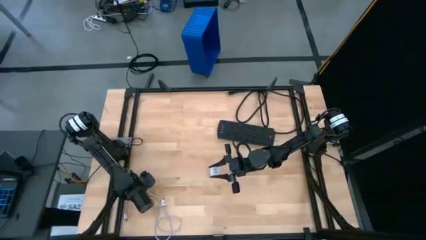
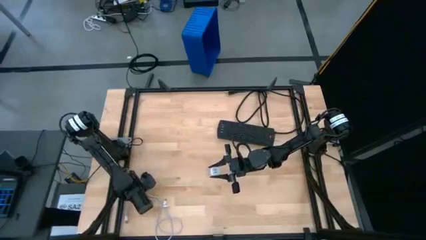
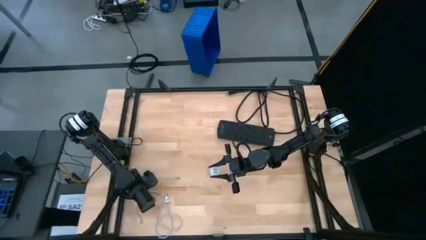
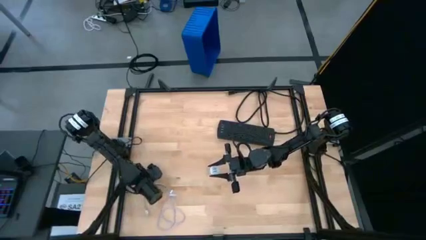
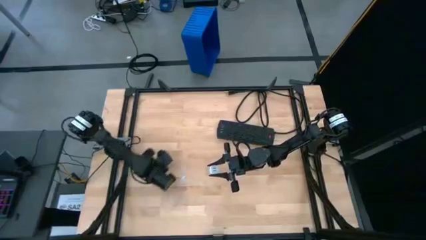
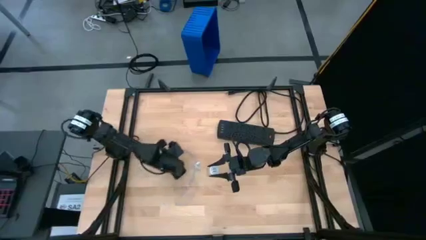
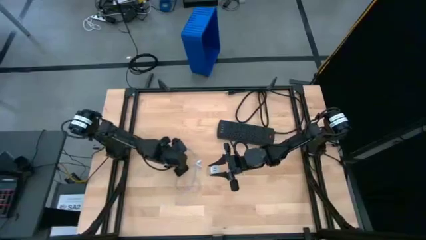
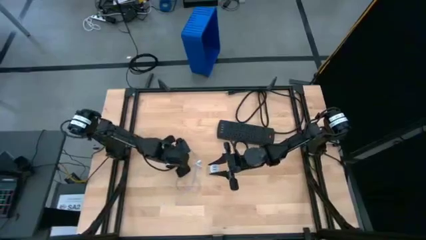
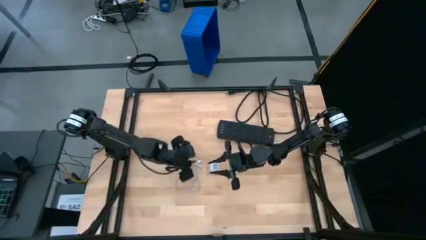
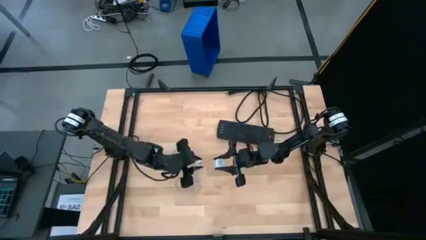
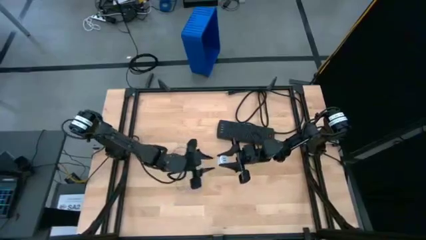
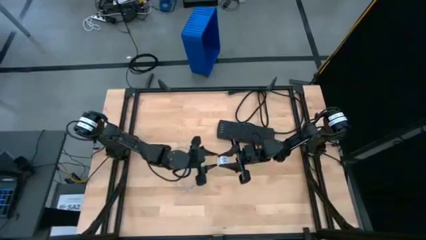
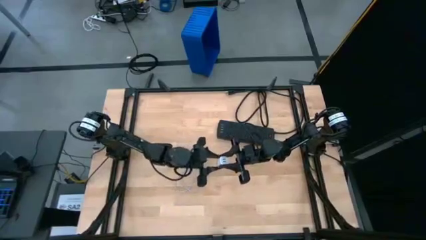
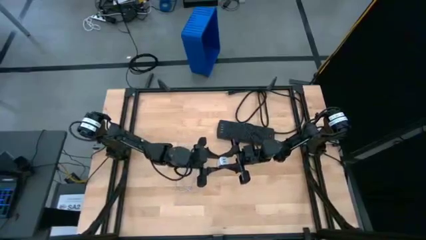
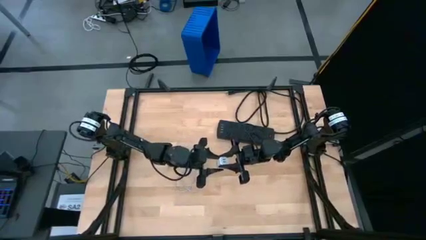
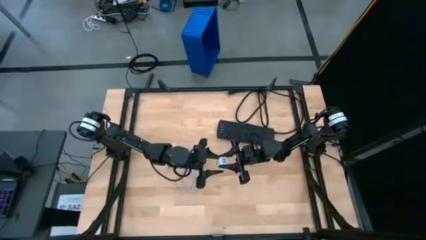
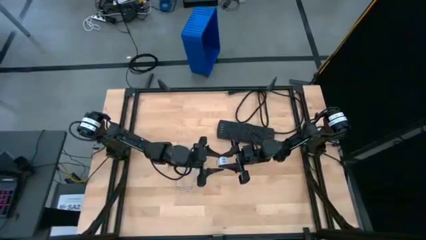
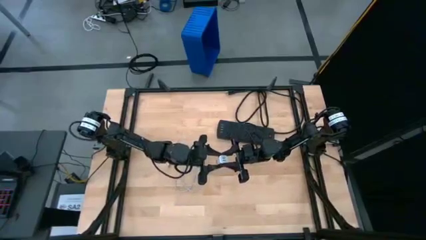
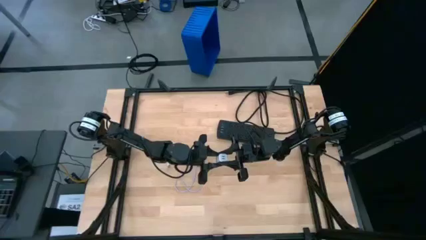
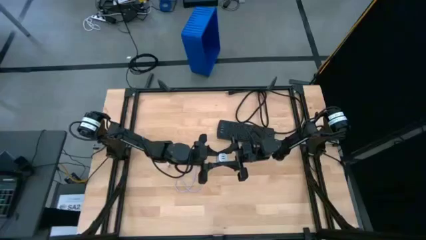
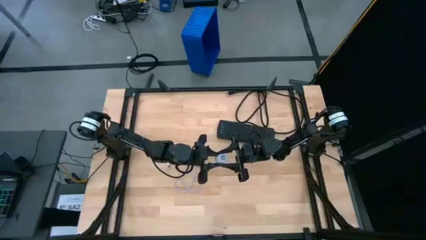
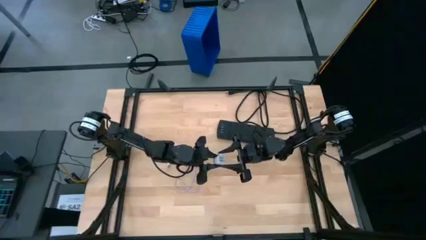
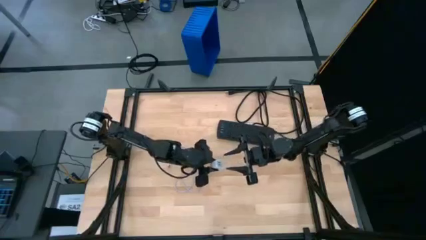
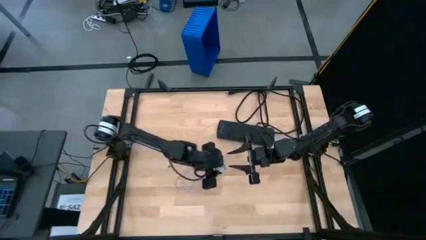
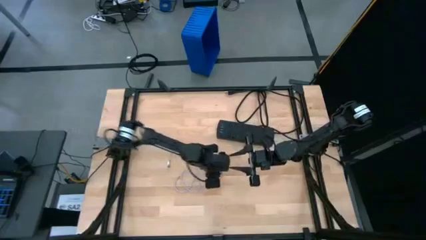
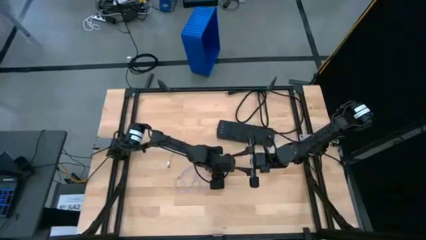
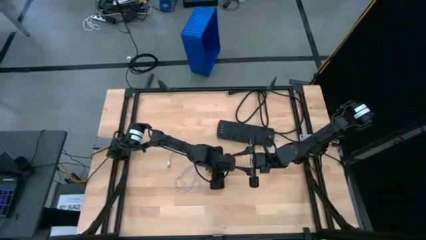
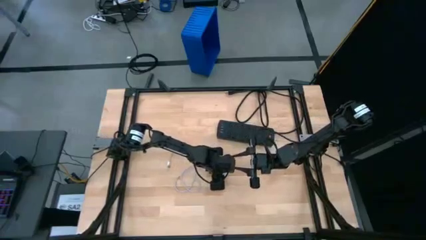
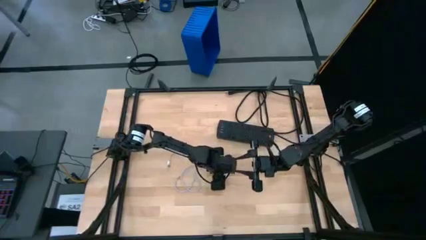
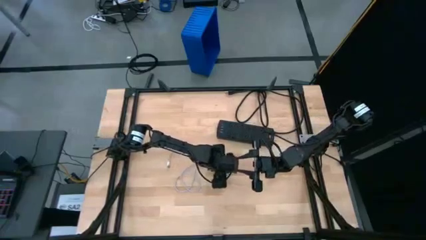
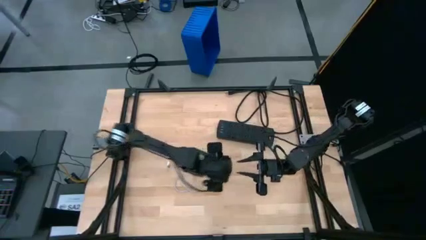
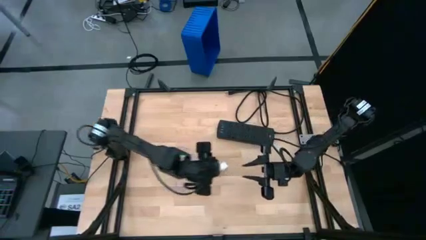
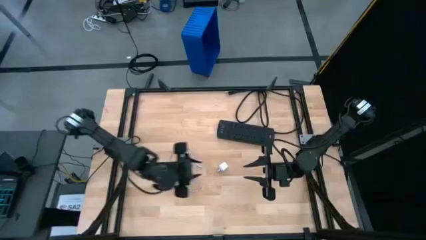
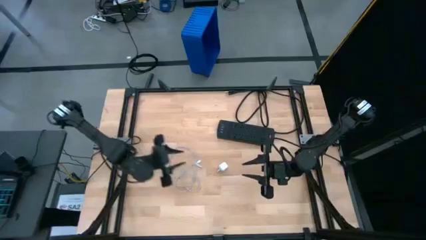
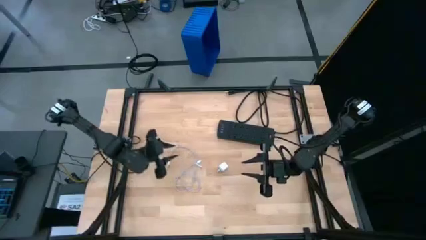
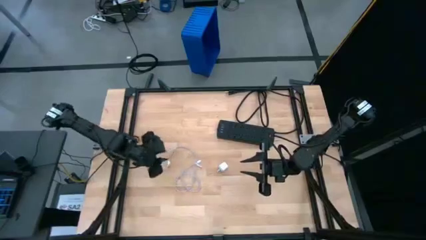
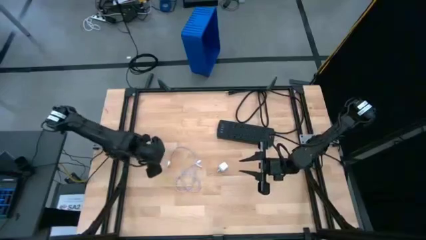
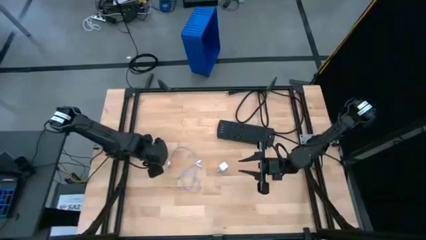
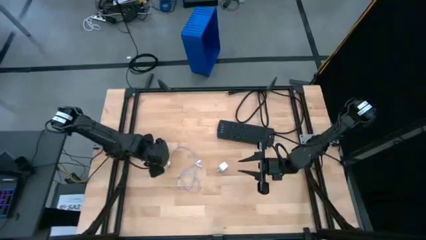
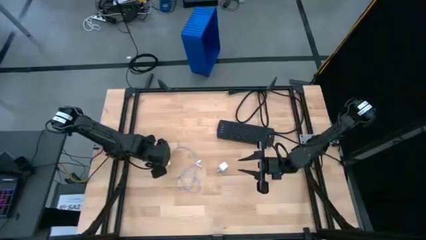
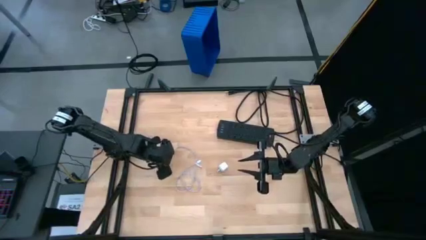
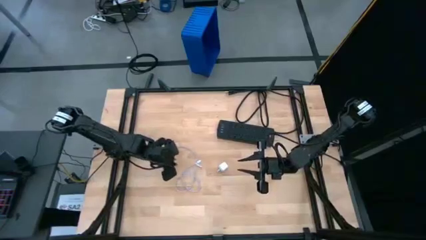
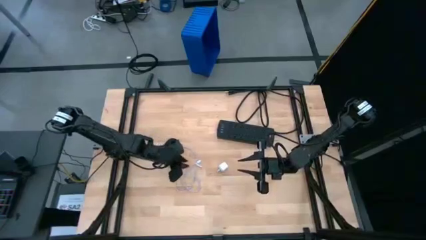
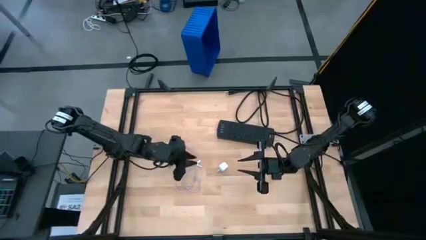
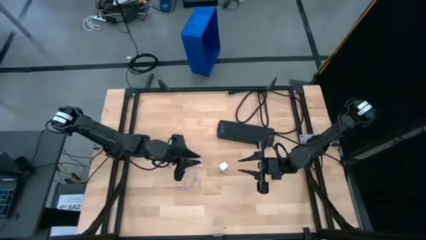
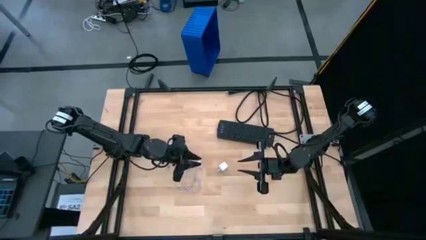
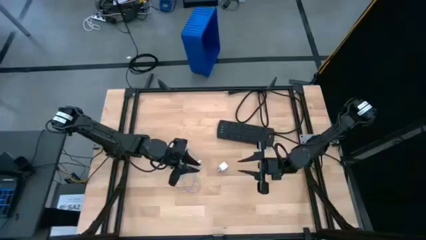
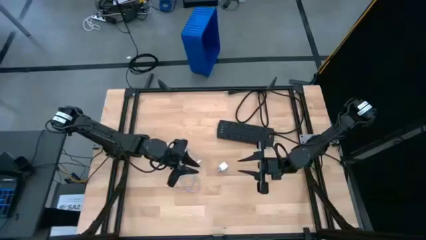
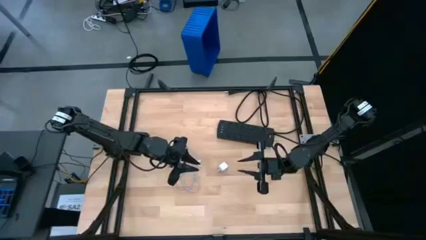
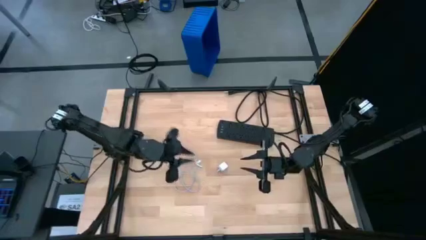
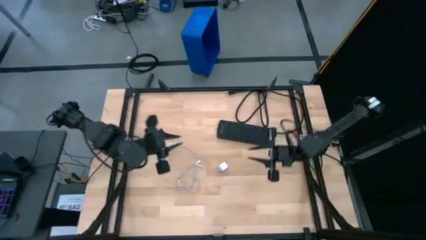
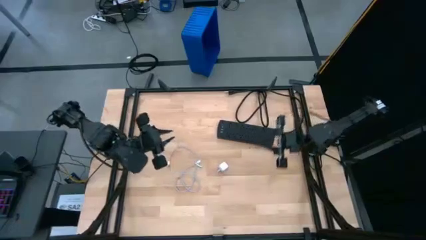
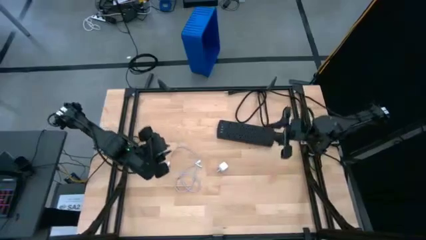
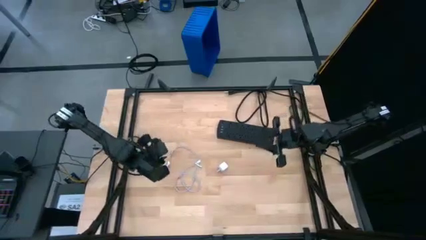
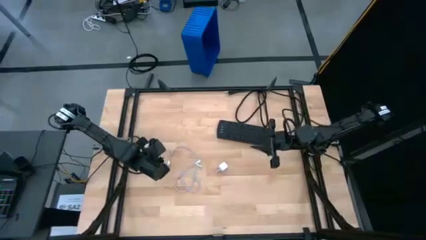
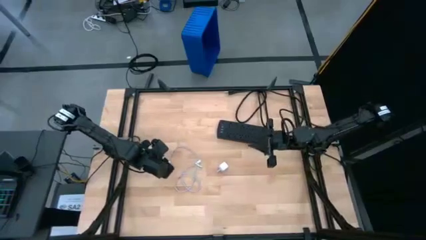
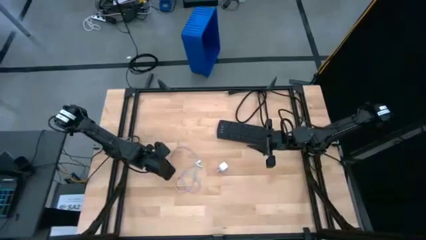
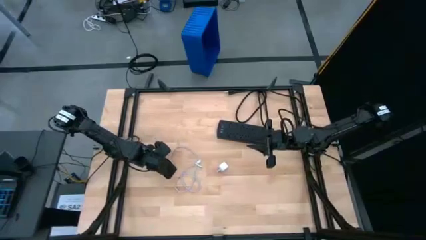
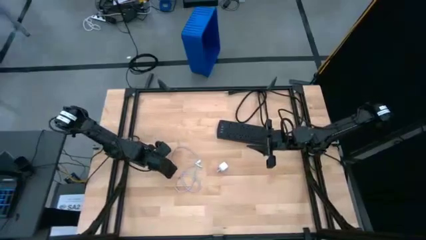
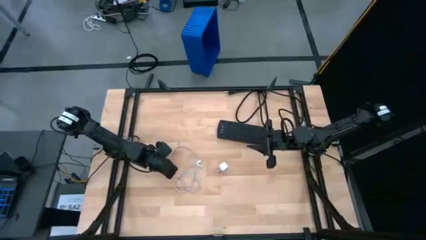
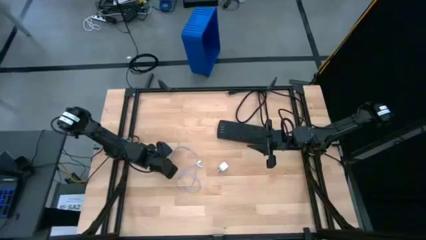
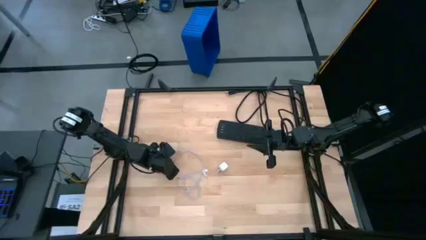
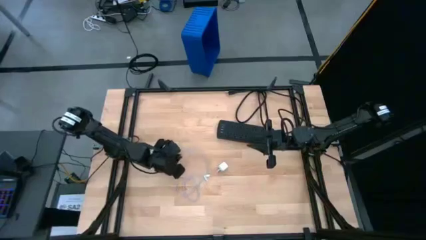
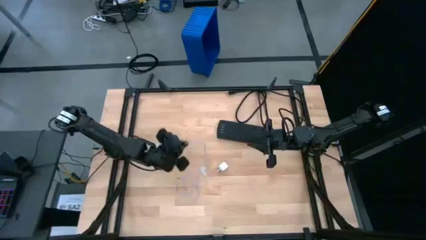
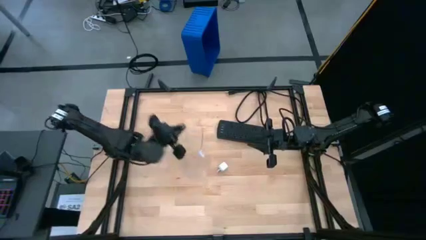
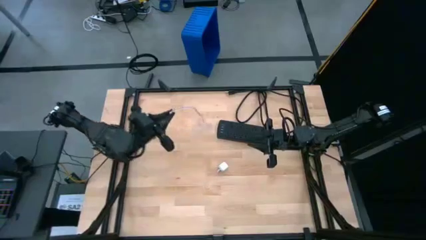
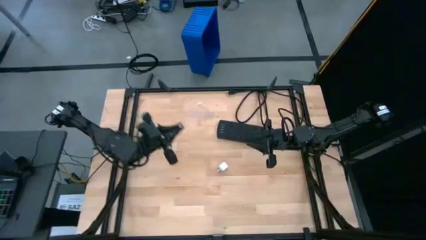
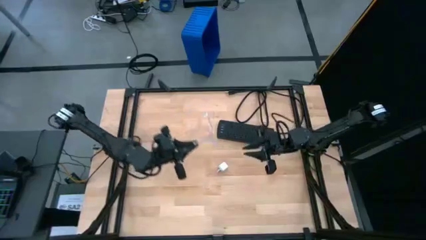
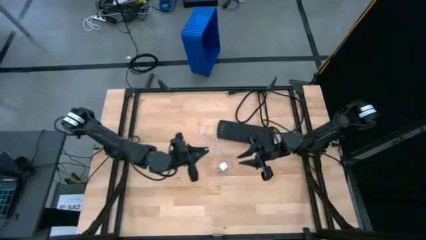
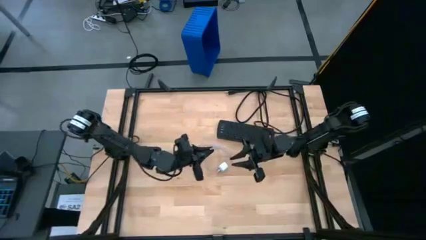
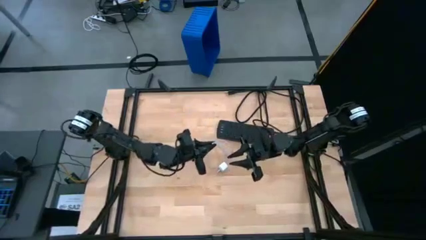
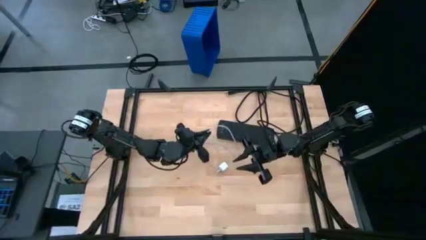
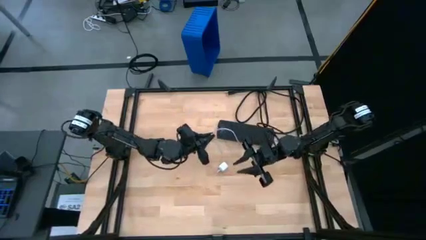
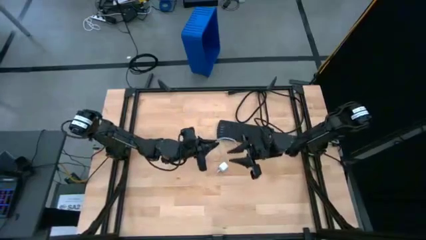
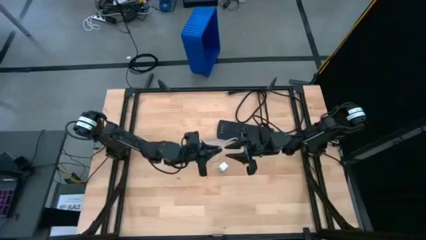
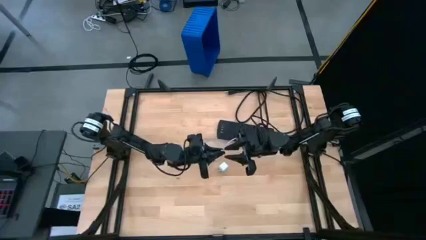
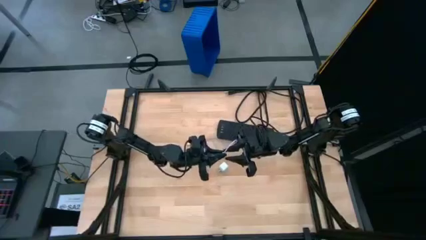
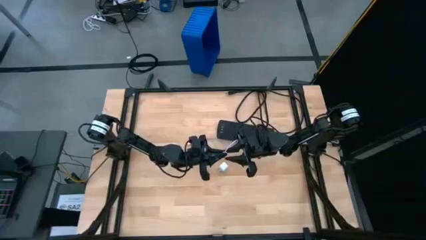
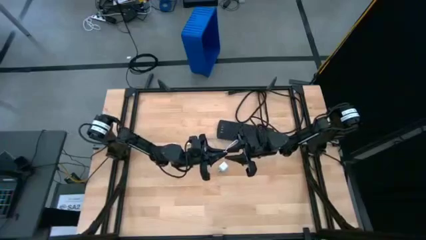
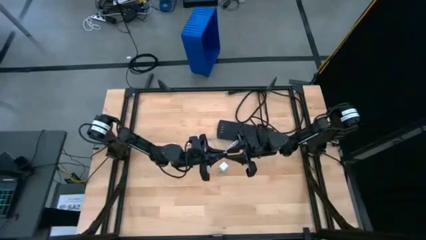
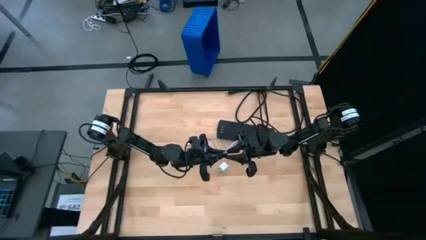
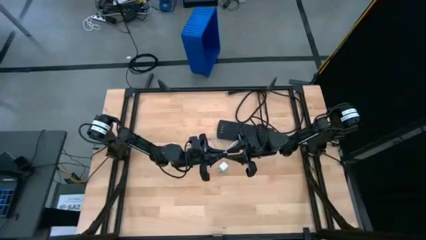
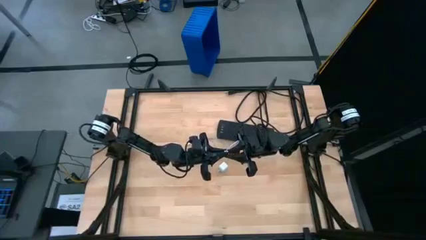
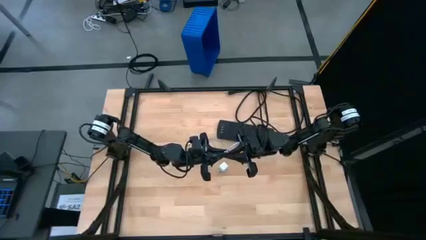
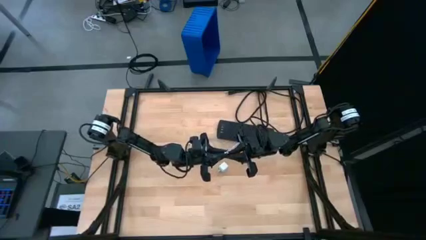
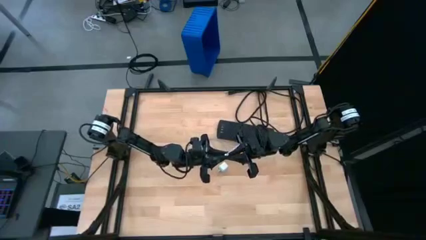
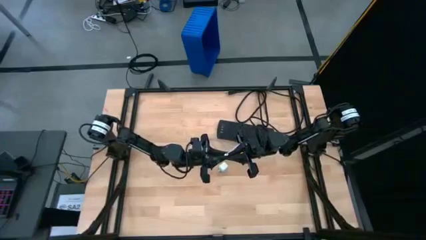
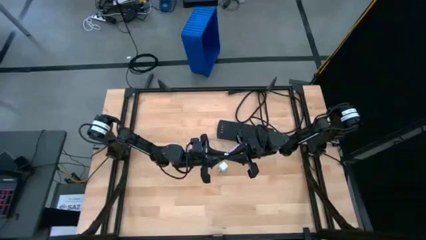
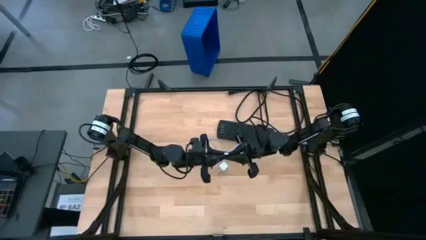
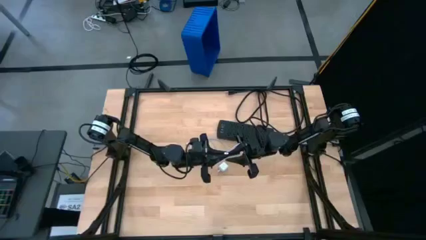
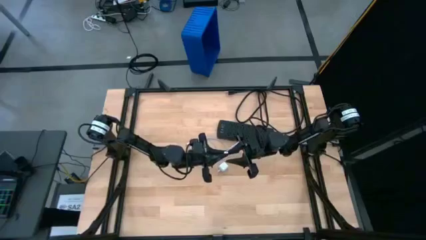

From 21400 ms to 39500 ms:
Task: Insert USB
Insert the white charger cable into the white charger adapter
